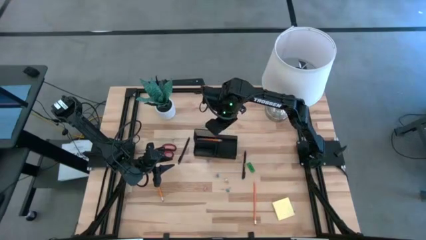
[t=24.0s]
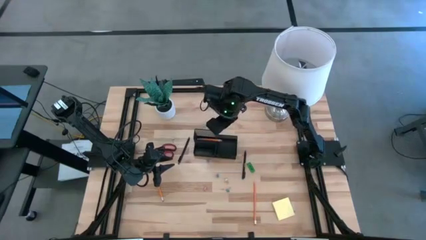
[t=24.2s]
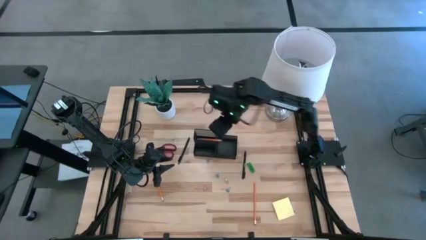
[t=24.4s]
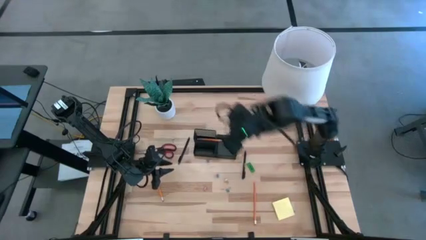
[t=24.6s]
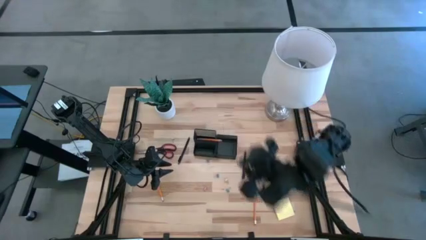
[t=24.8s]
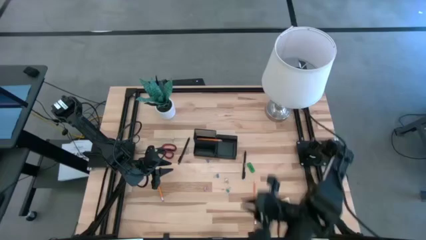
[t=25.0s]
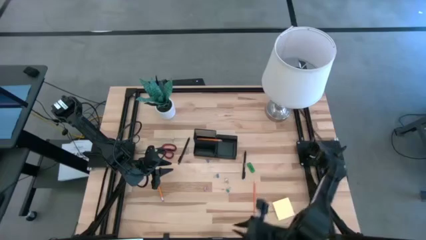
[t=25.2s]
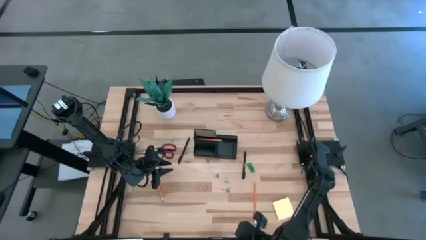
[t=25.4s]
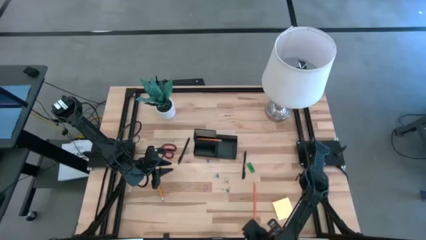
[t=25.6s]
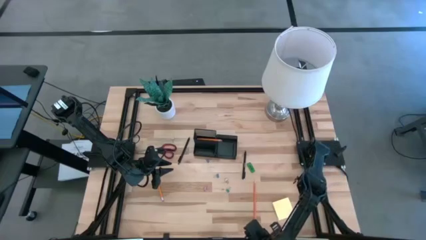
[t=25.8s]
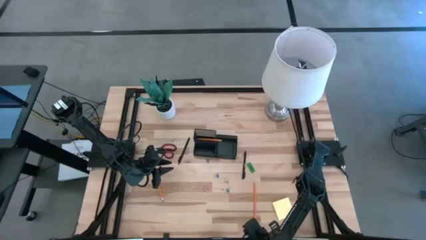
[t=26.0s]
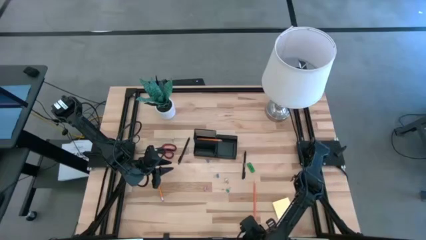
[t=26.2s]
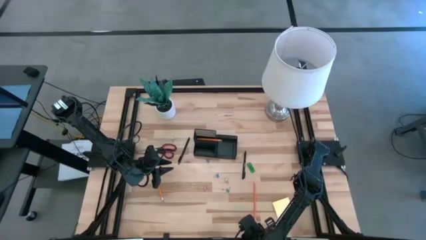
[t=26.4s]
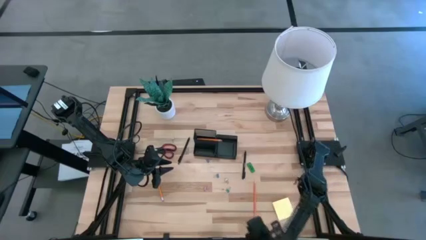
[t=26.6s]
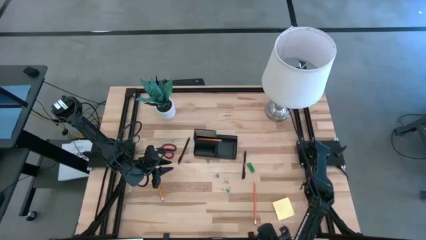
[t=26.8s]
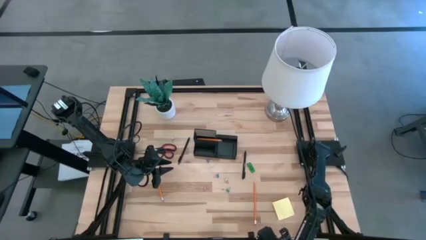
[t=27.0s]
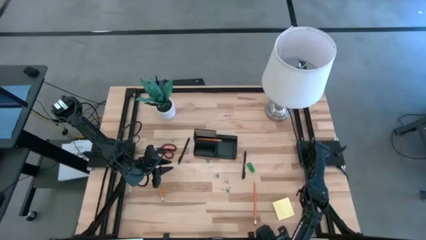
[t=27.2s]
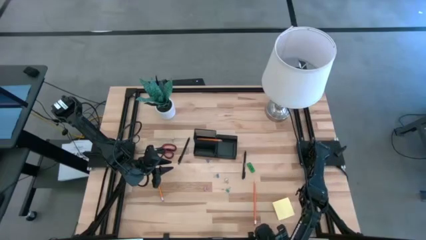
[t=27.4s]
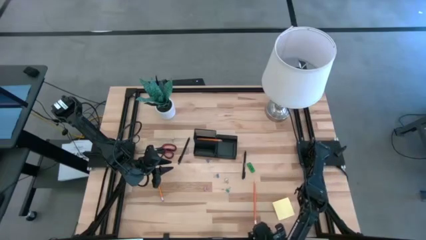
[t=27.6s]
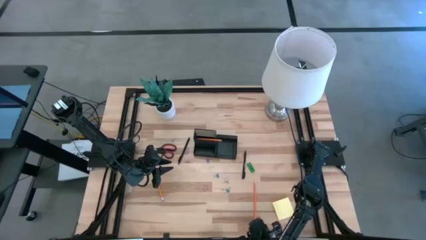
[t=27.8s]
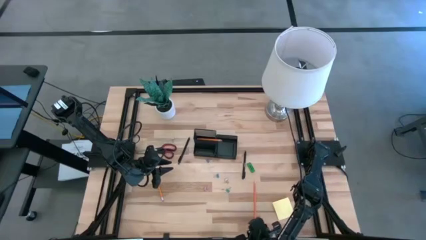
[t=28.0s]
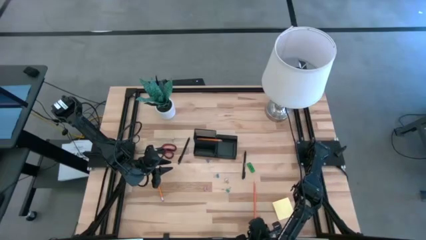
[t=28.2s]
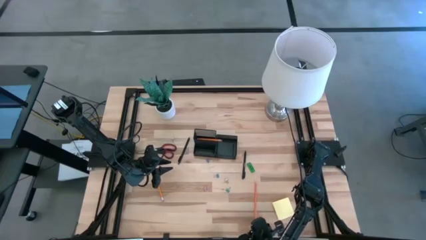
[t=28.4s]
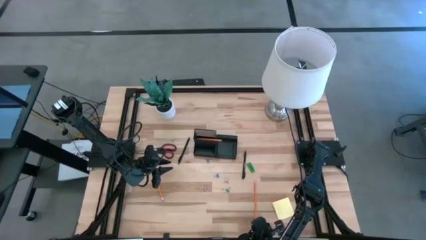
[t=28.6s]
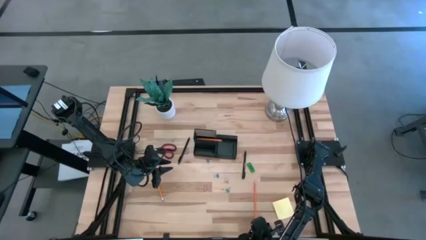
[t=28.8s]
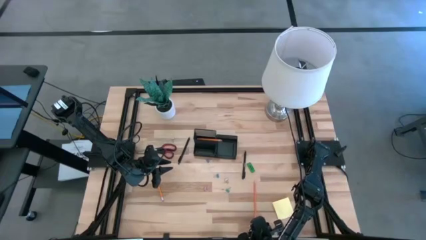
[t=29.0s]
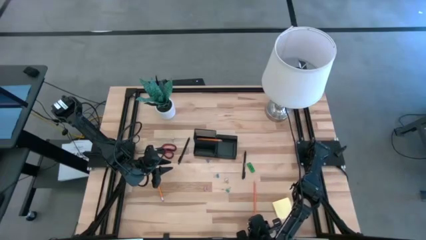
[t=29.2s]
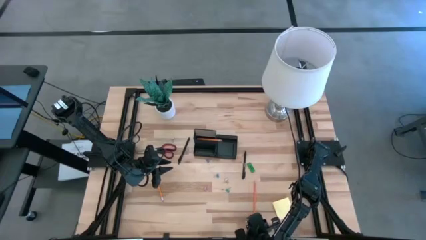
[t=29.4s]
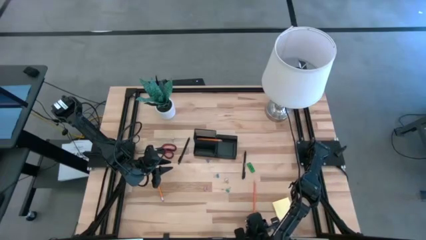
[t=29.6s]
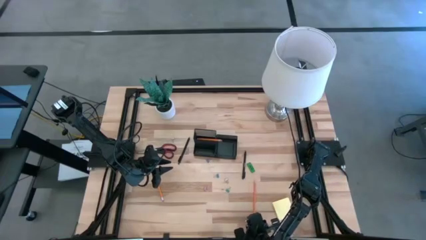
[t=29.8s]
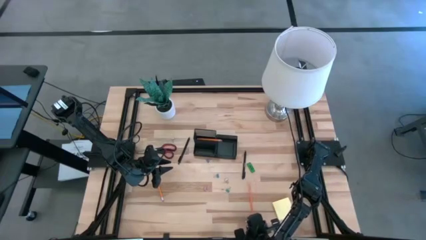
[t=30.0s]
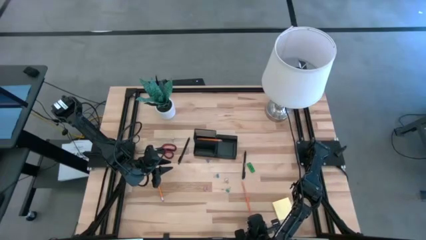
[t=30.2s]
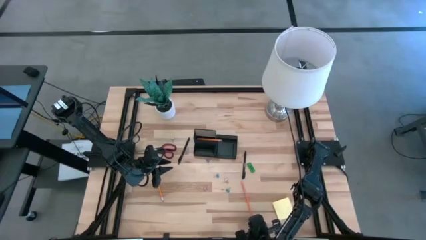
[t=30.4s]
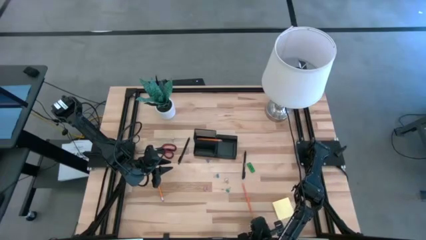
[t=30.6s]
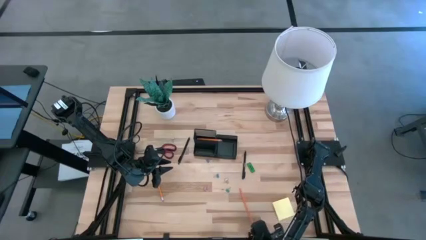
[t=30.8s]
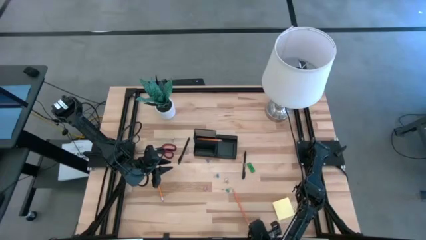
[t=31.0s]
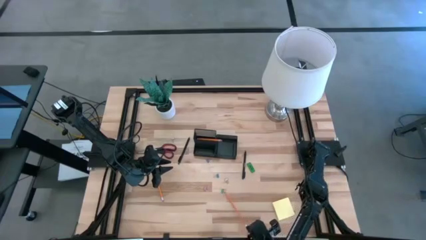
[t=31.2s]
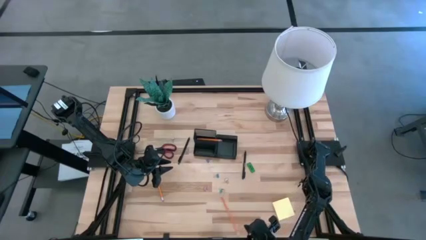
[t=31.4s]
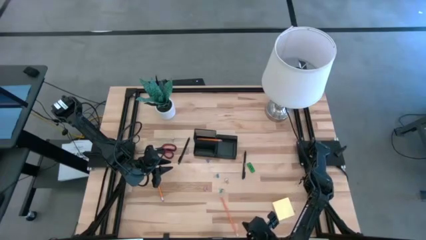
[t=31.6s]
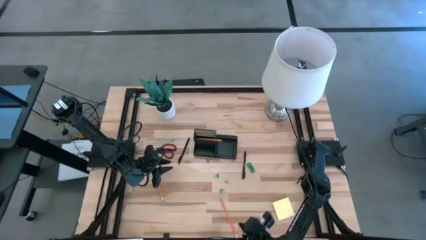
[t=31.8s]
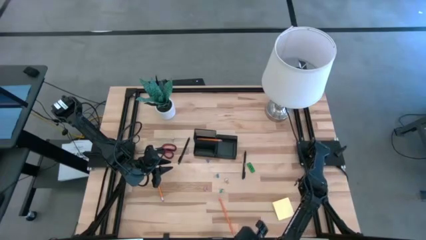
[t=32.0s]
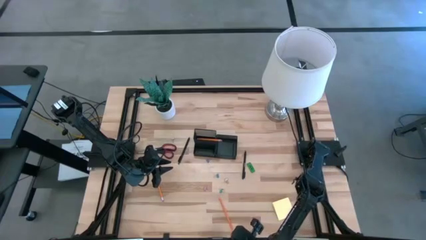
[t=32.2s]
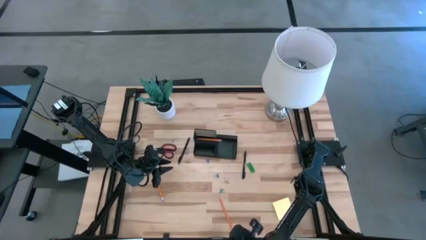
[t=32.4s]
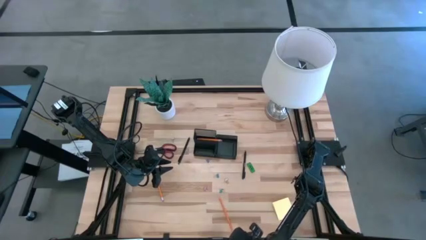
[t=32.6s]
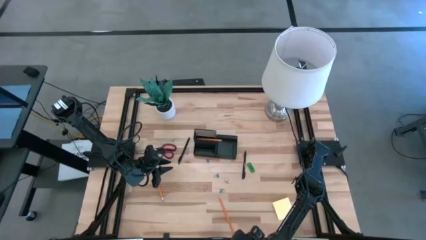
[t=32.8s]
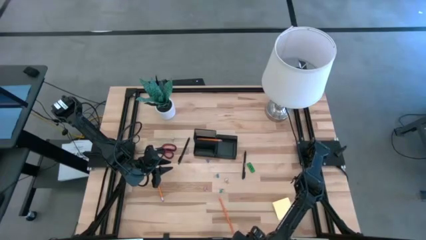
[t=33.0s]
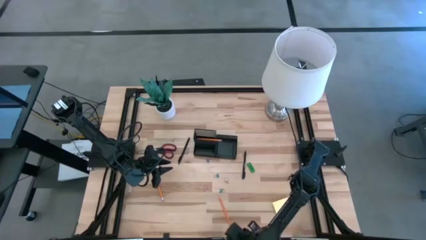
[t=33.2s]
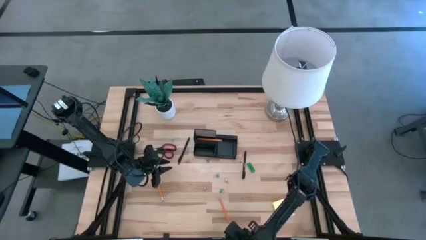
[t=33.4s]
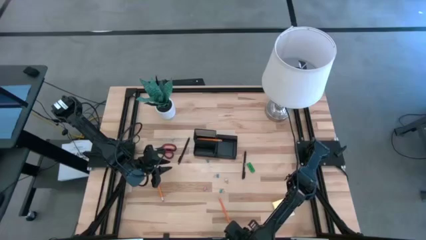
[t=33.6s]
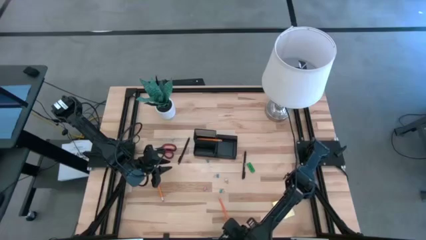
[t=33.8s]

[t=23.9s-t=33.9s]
Task: Pick and place office supplies into organizer
Put the bottom orange pencil into the black desk organizer

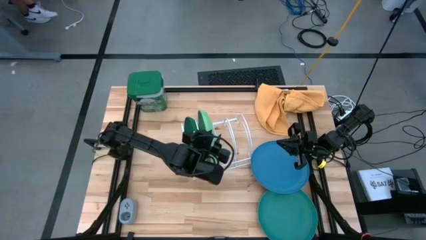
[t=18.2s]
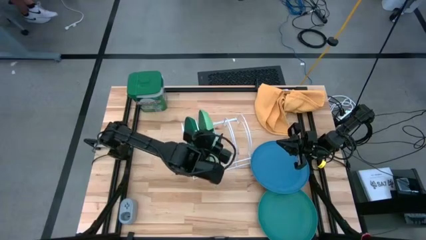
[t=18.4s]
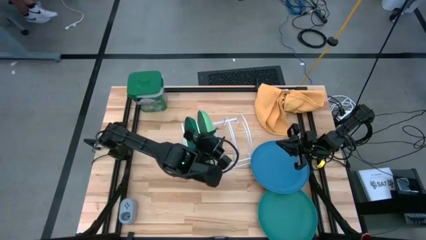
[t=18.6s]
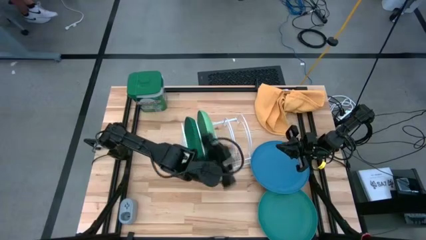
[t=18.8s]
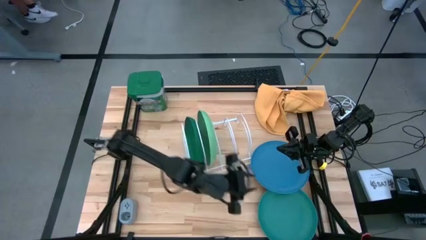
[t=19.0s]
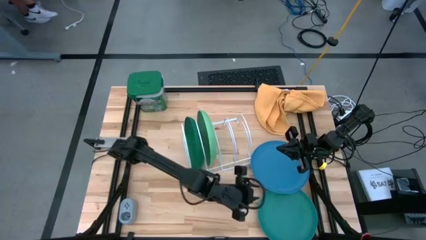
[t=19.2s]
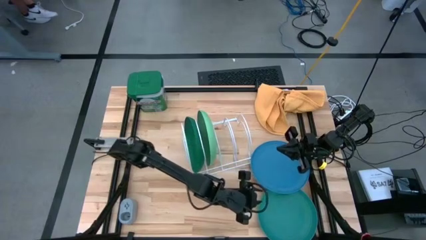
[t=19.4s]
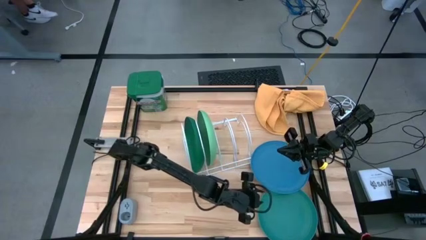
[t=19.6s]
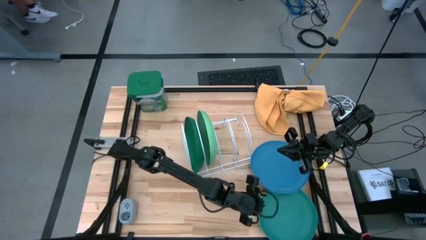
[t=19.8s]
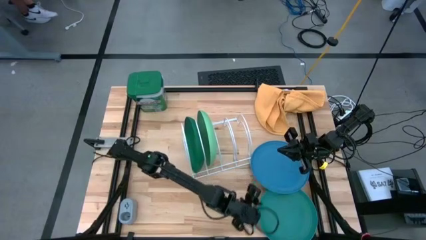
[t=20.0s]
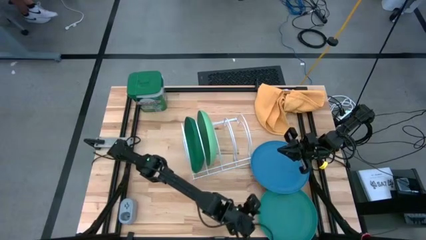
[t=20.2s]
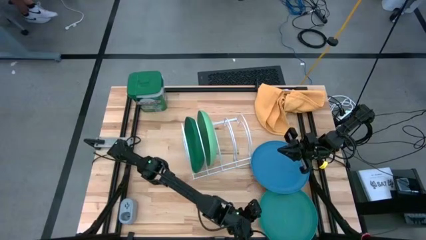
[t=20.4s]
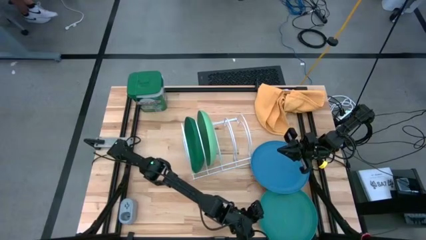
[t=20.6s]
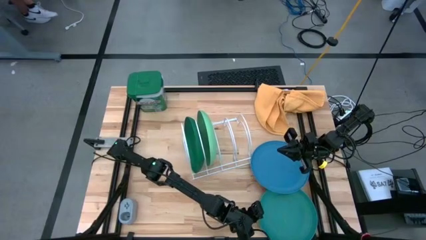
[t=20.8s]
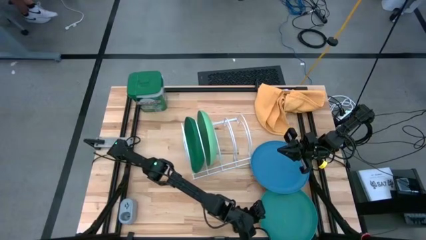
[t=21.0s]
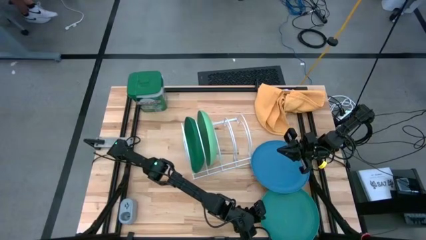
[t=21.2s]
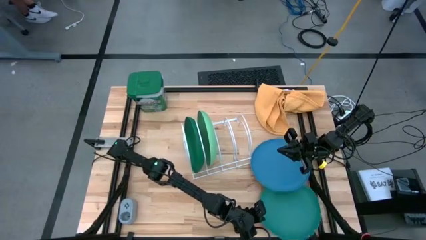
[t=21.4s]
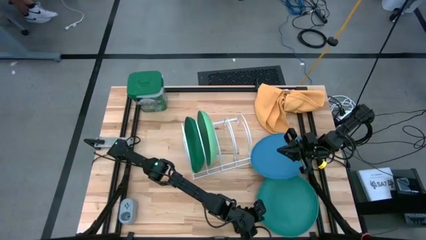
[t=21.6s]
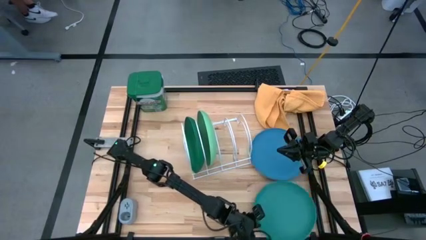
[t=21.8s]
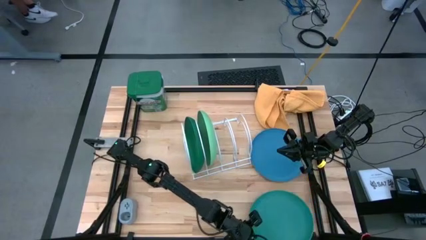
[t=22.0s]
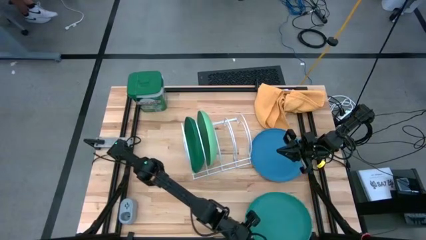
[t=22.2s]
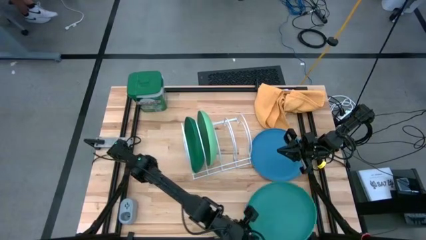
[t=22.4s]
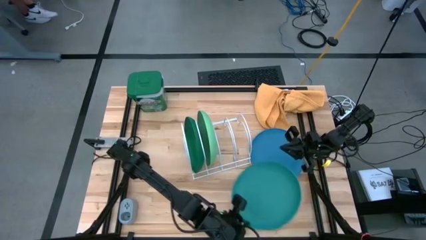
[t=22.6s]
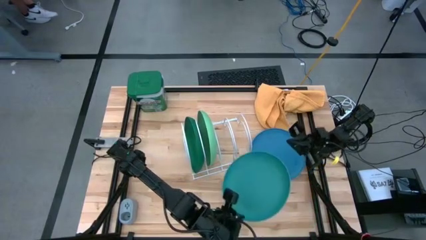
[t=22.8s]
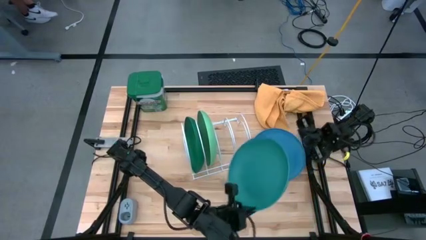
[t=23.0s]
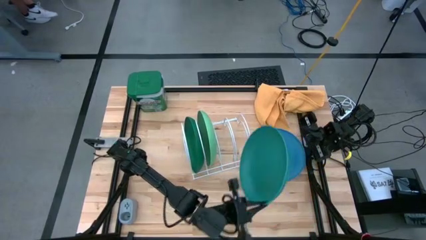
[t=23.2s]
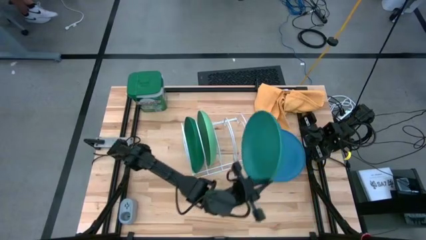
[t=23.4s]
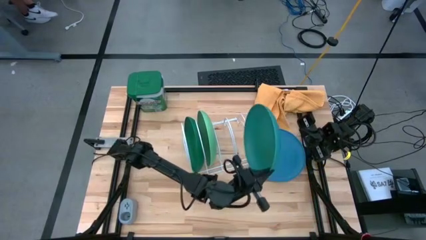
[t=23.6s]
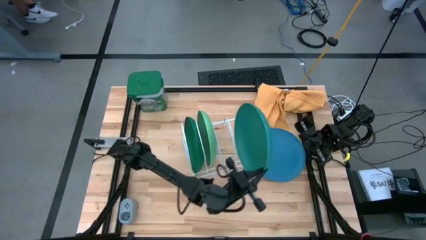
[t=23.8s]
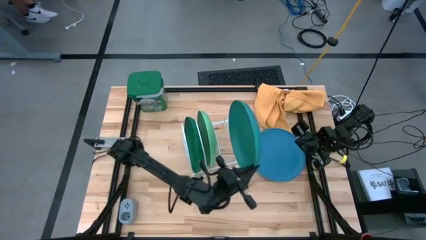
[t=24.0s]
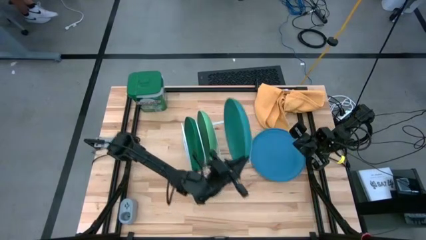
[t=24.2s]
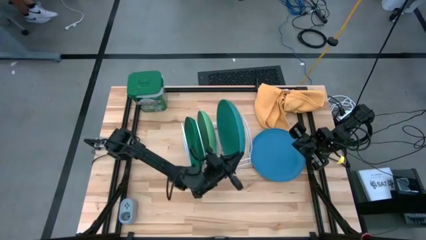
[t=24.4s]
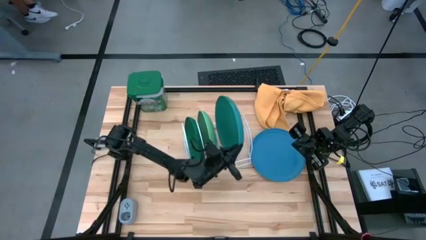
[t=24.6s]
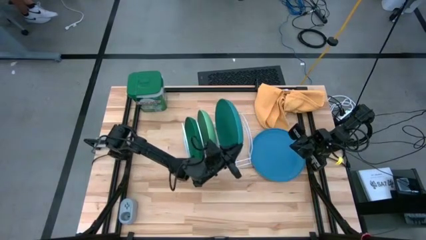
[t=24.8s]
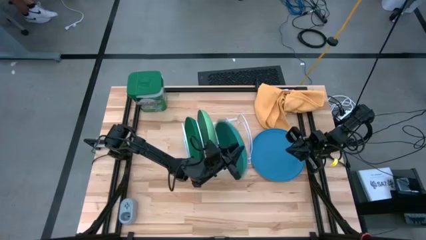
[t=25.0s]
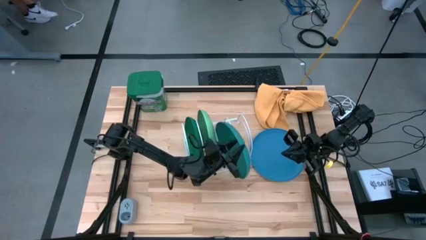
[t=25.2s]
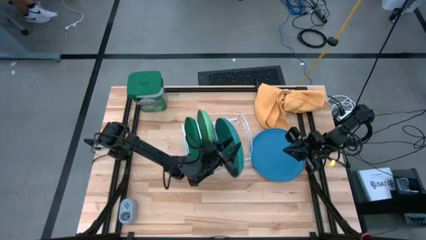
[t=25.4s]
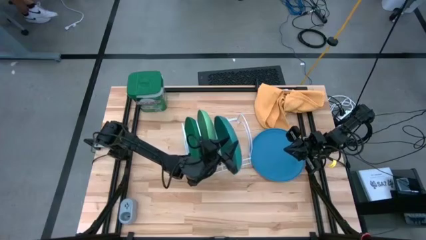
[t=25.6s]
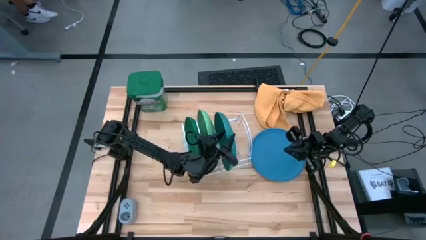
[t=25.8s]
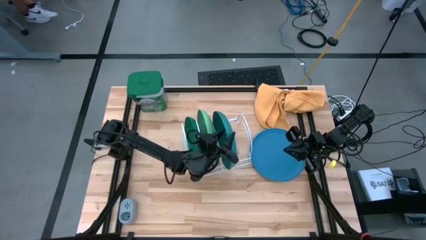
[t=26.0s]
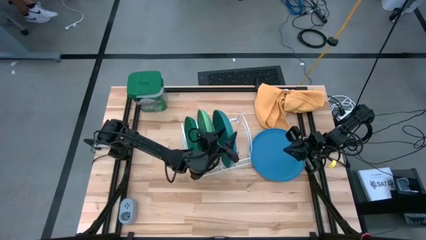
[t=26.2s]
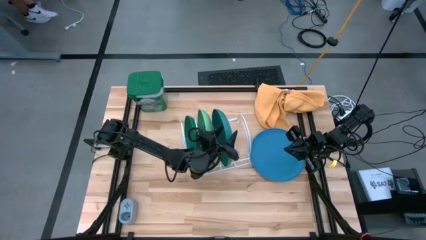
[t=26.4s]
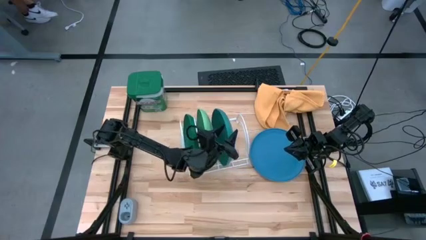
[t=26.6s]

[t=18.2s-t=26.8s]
Task: Sort dishes
Put the dark green plate in the dish rack
